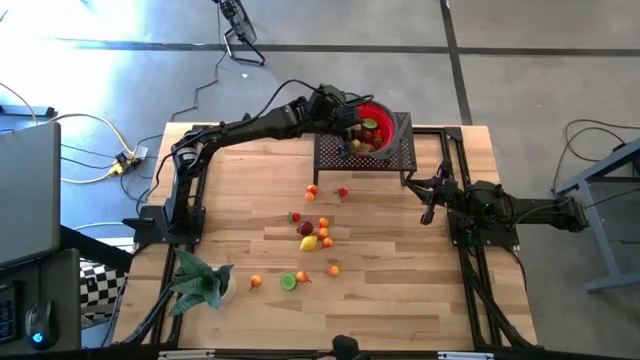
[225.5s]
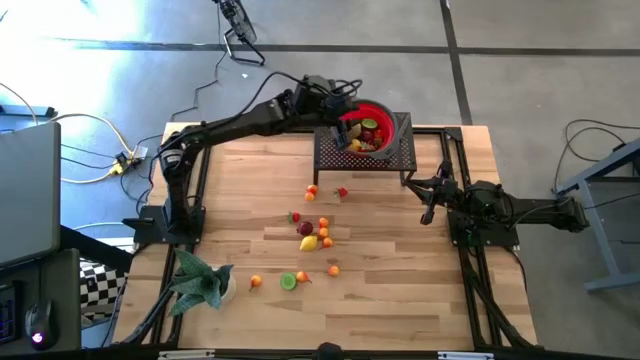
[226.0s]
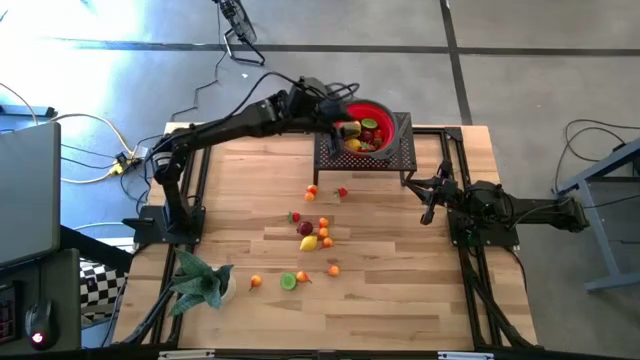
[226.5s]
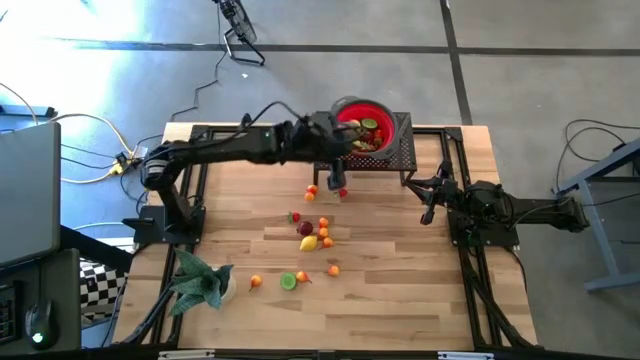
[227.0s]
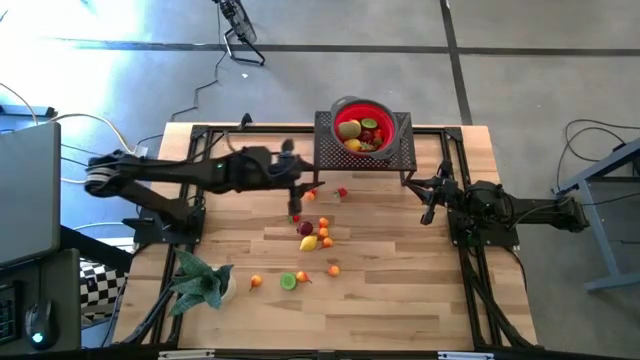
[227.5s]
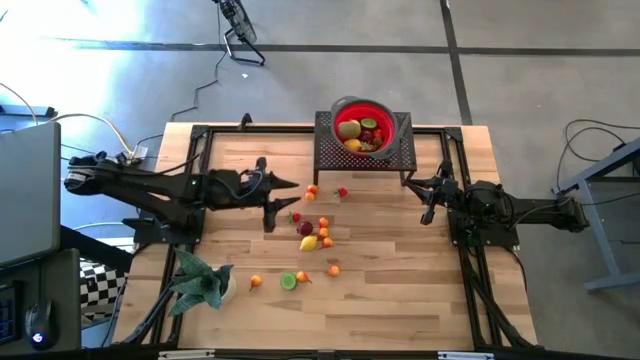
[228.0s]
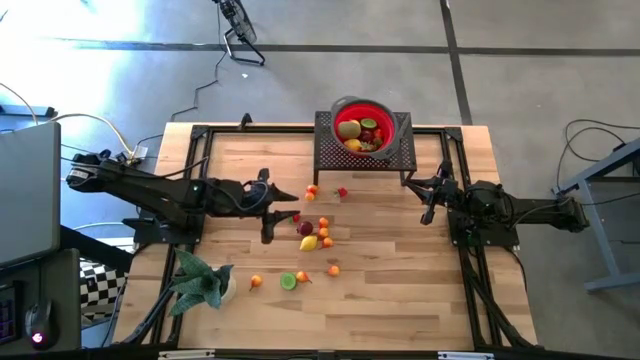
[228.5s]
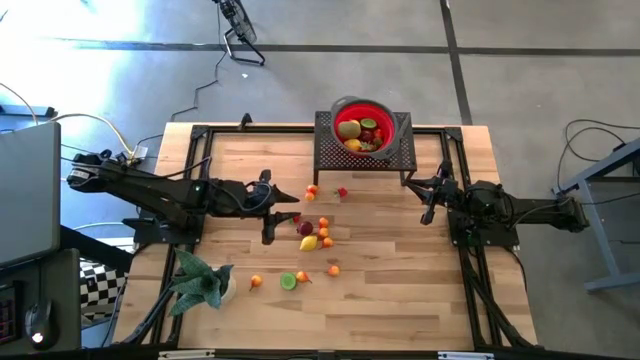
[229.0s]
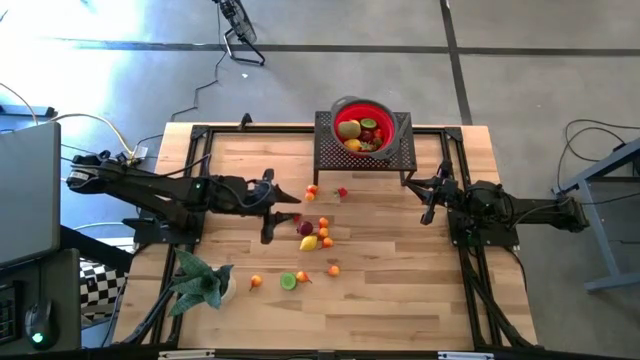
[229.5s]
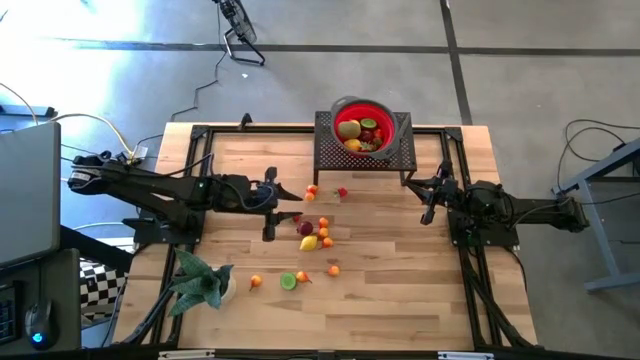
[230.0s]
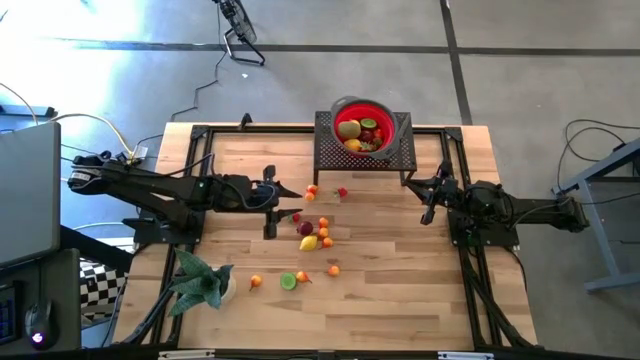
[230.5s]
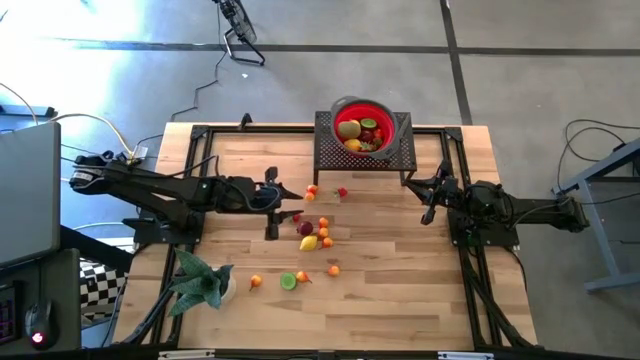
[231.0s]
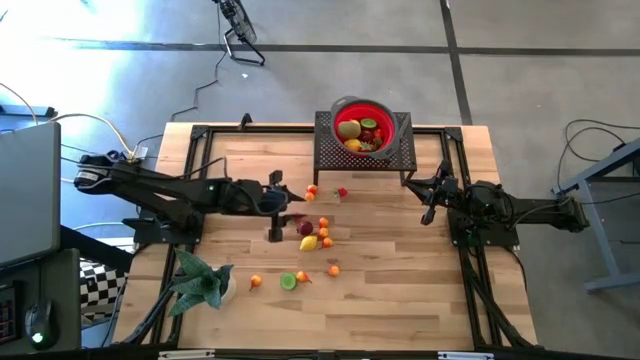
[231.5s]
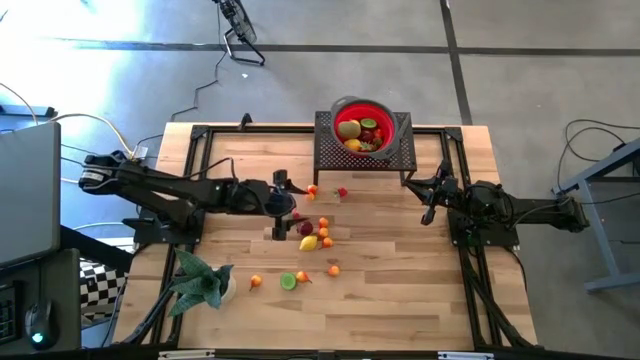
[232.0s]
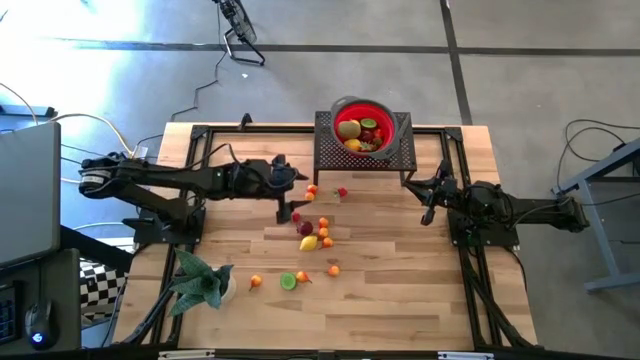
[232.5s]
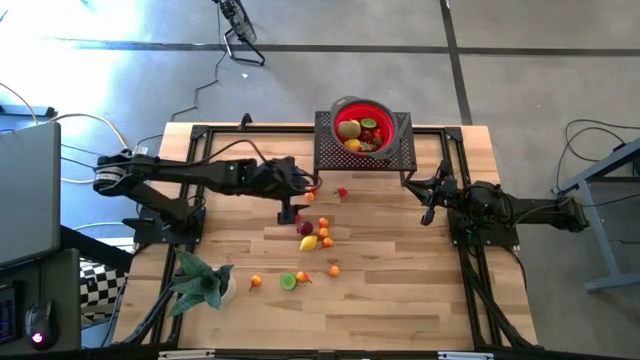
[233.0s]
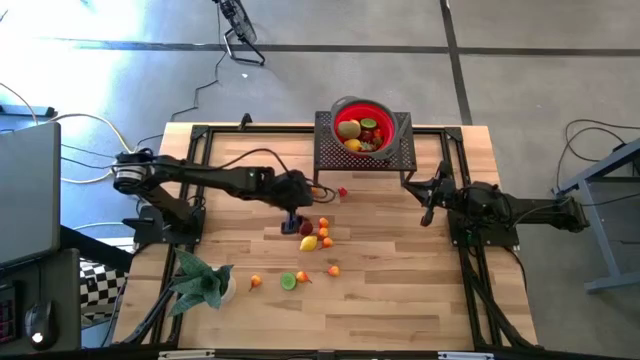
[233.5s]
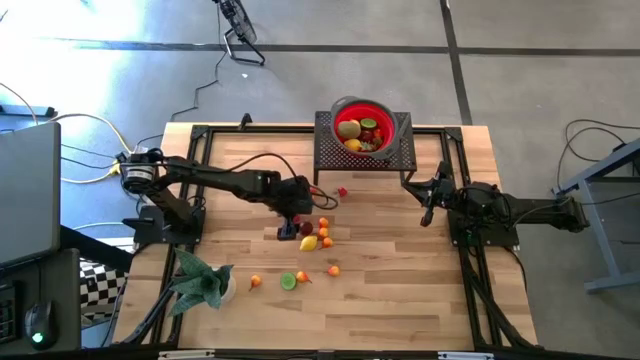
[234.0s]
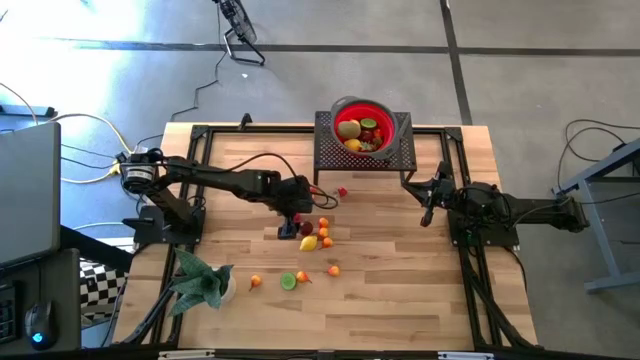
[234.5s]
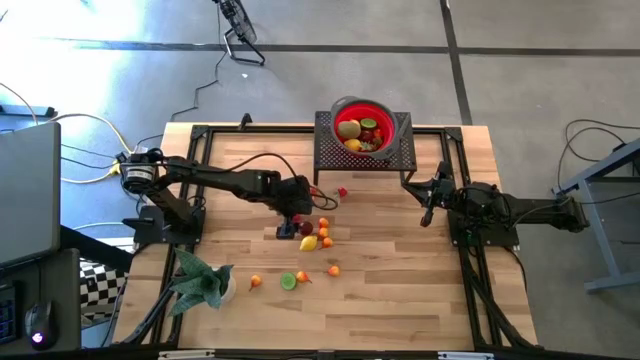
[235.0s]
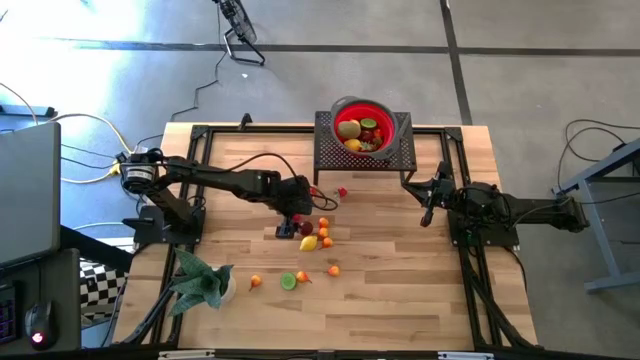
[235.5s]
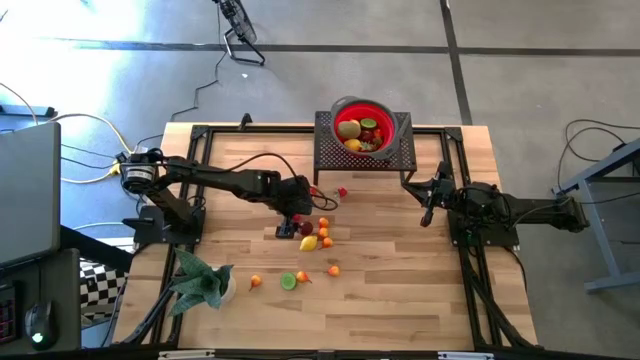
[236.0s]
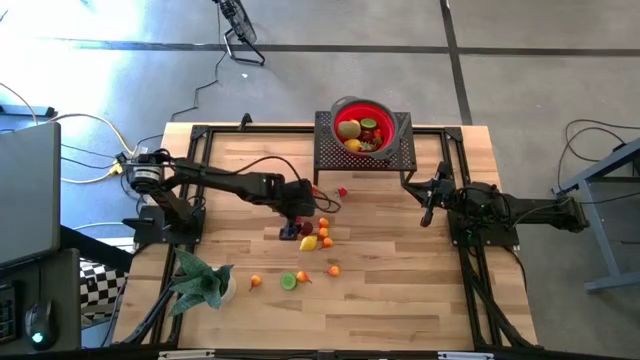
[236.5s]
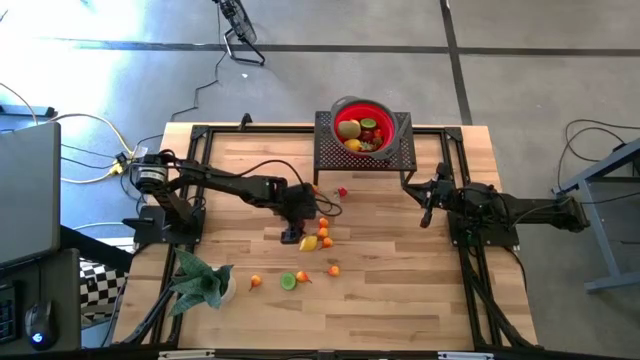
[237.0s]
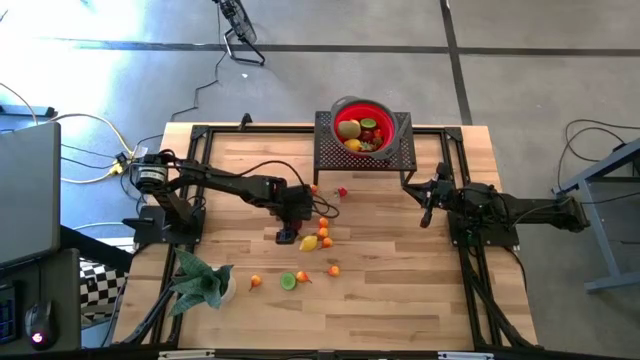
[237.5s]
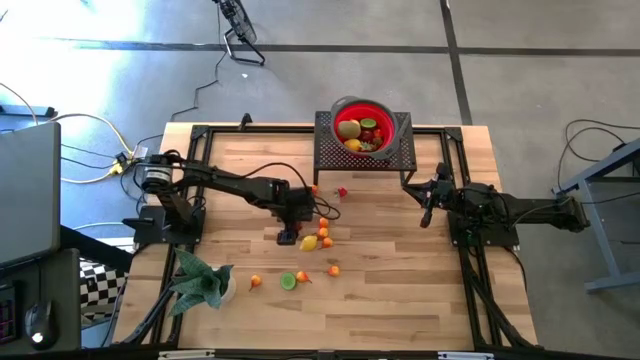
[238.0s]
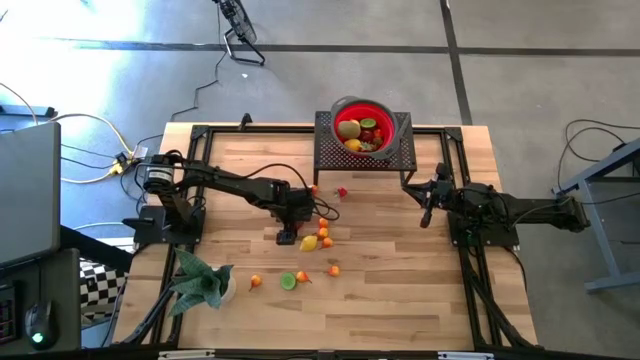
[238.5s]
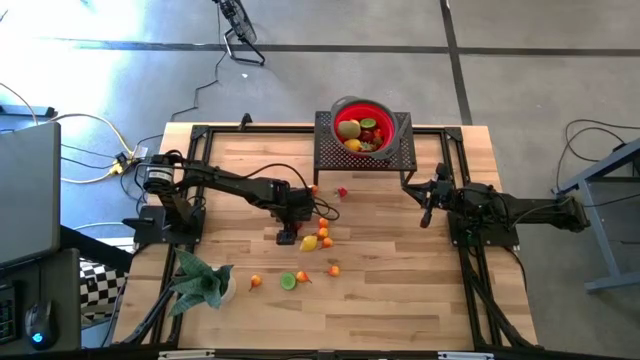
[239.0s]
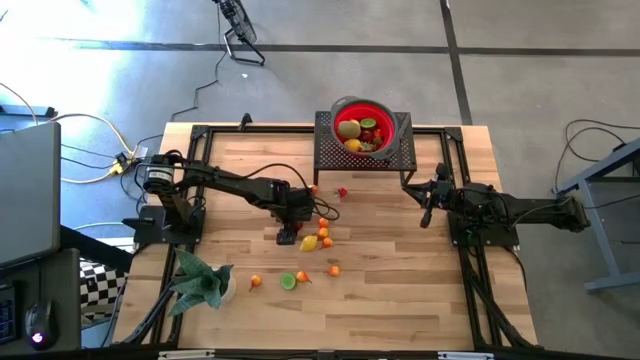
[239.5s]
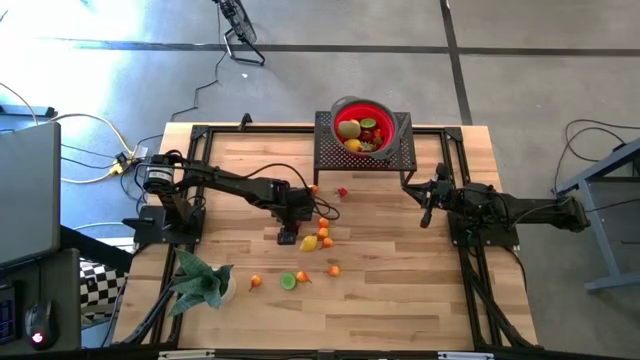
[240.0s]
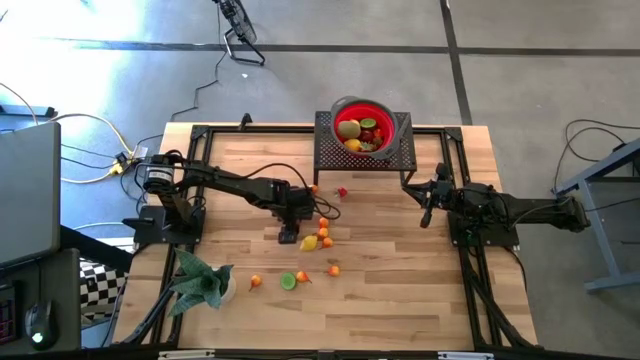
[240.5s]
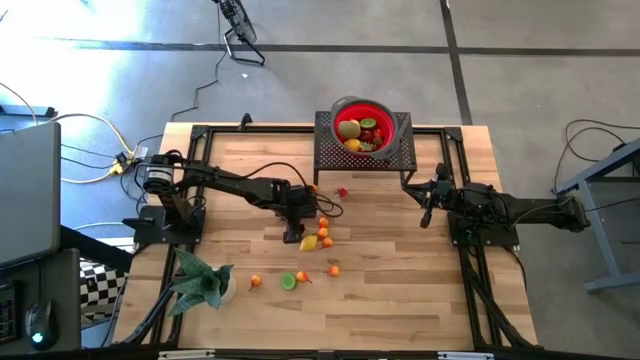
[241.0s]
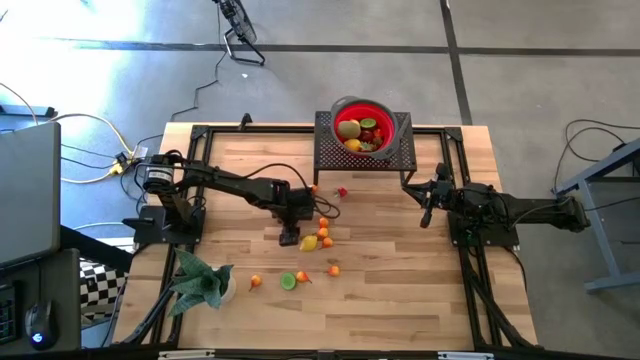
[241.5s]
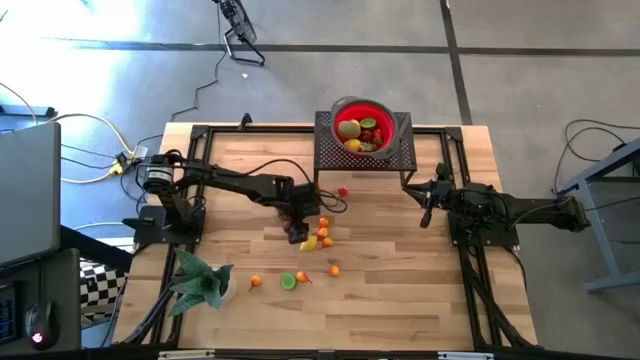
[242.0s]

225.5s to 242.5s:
Task: Pick & Place Fruit
Put the pomegranate into the strainer on the shelf

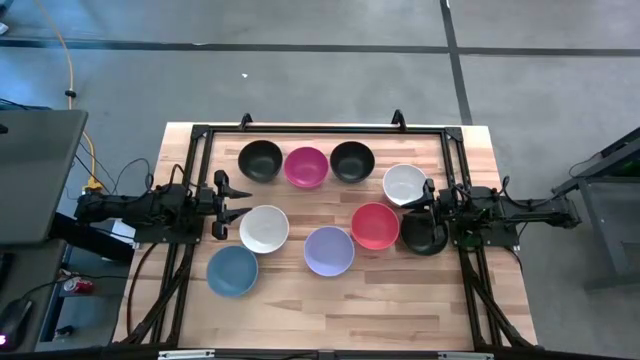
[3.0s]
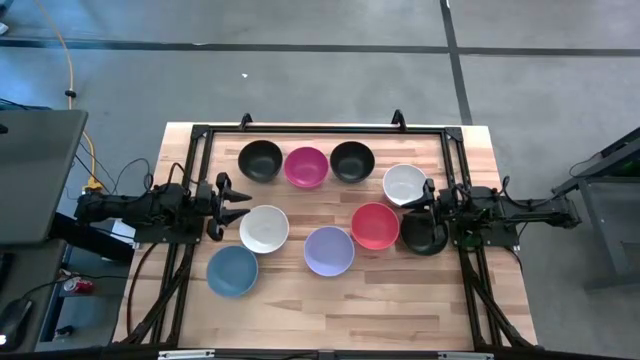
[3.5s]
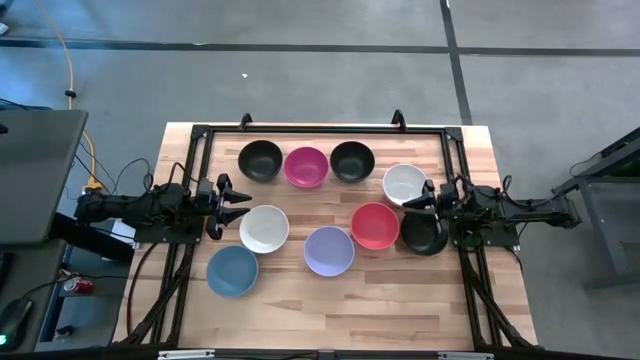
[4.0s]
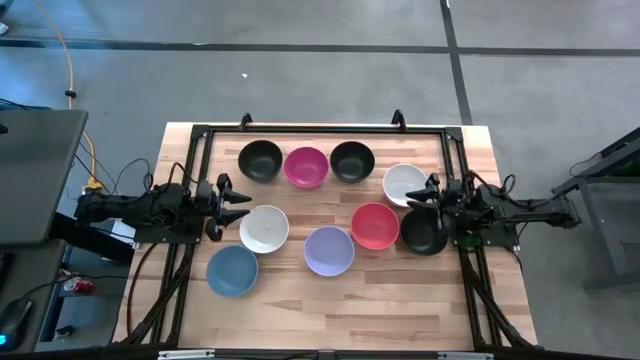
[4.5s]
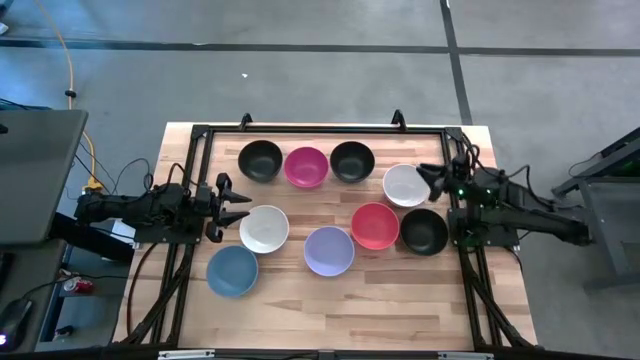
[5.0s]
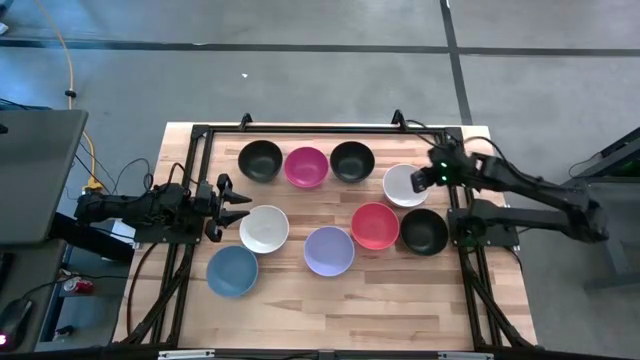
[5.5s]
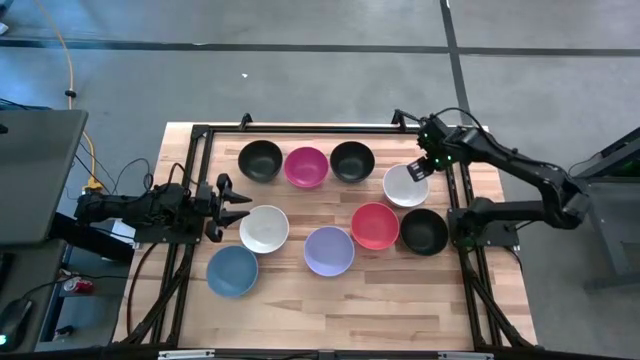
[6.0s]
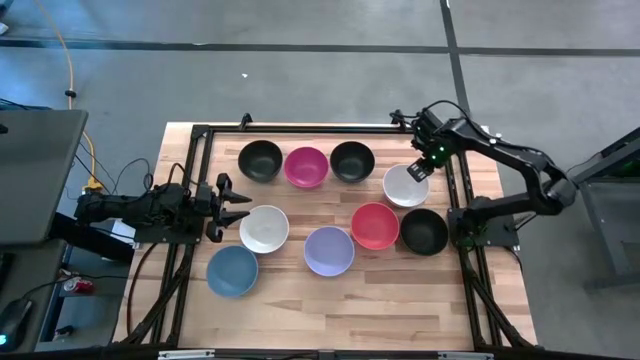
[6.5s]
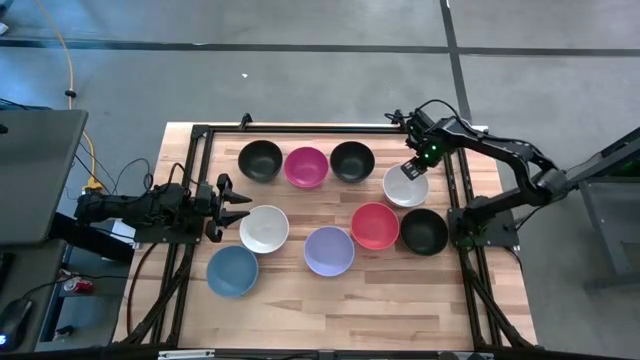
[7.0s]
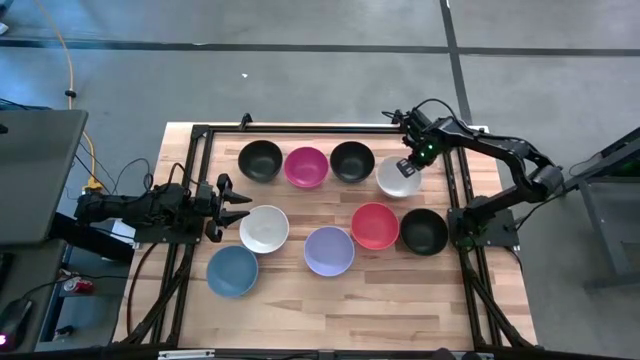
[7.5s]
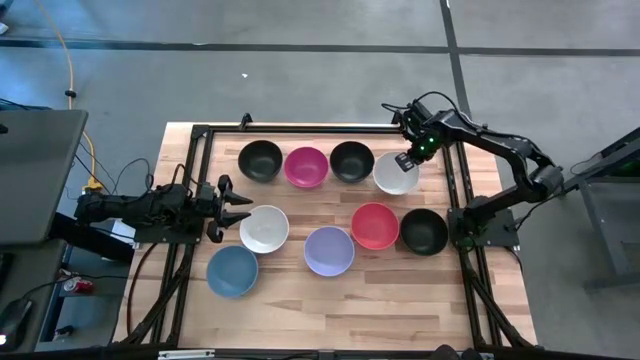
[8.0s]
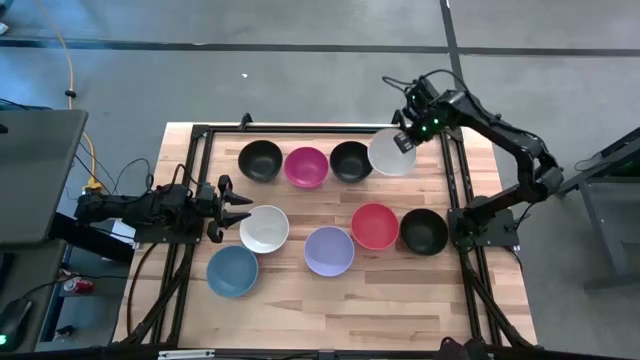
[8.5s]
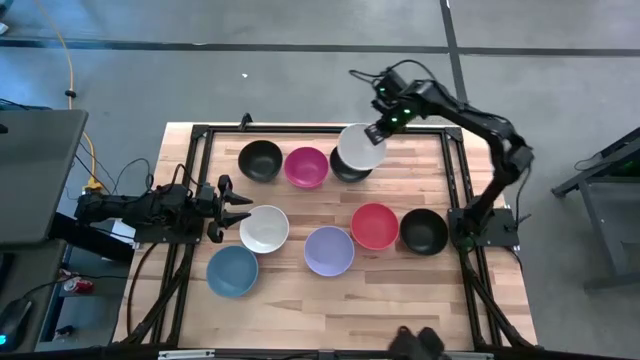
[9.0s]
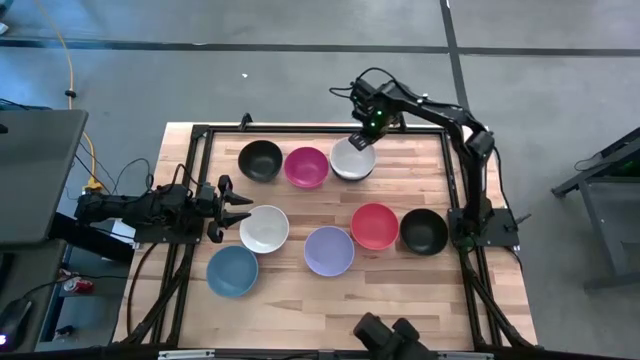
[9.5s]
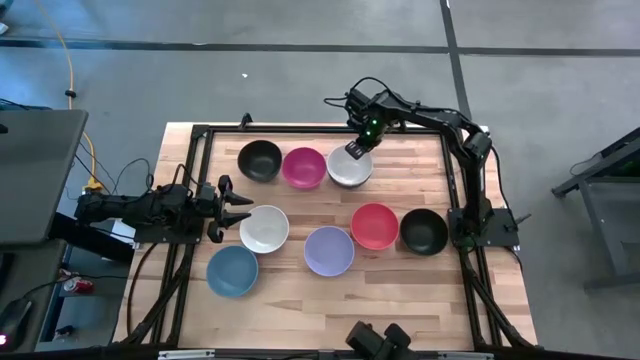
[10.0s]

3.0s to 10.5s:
Task: Nest bowls inside each other
Stack the right white bowl on top of the middle black bowl
